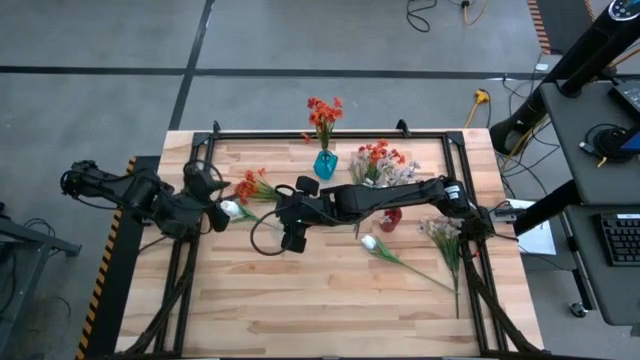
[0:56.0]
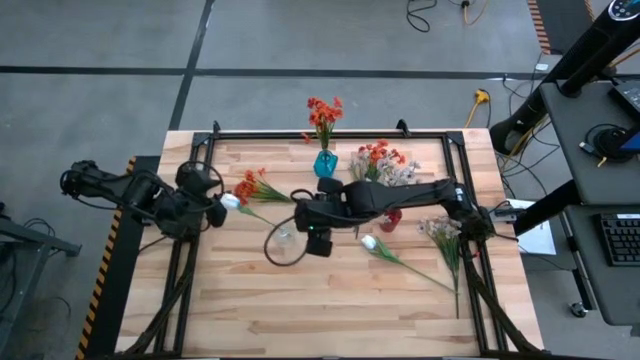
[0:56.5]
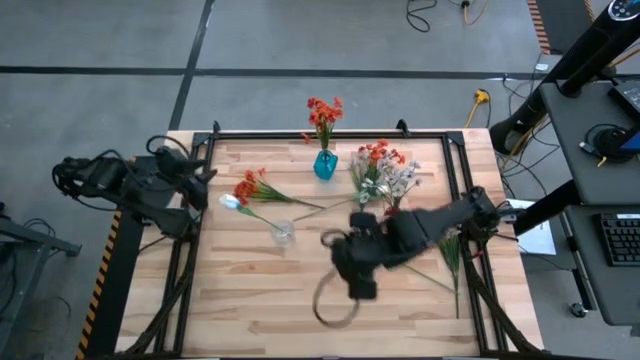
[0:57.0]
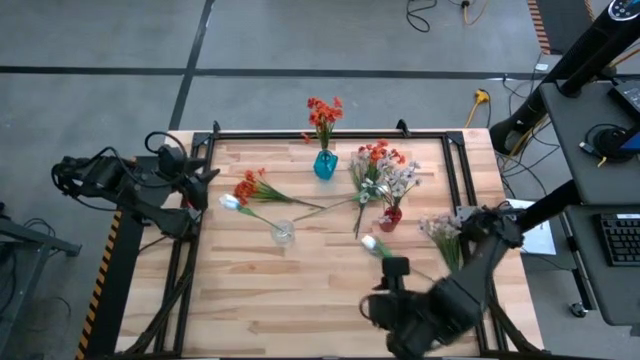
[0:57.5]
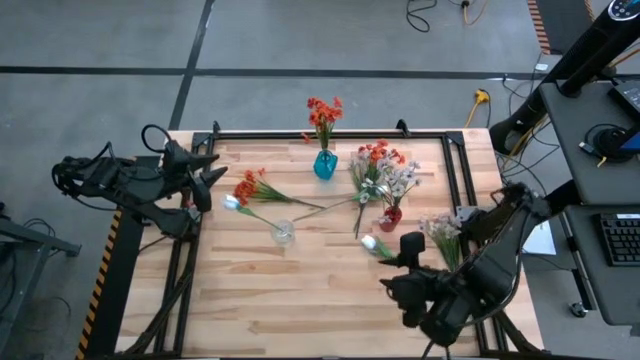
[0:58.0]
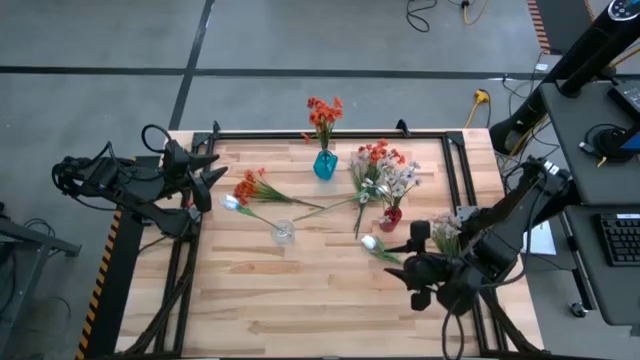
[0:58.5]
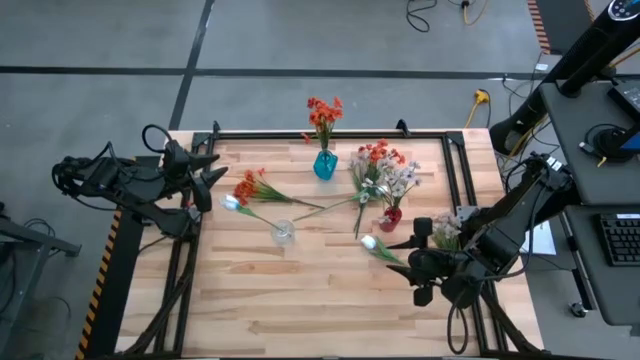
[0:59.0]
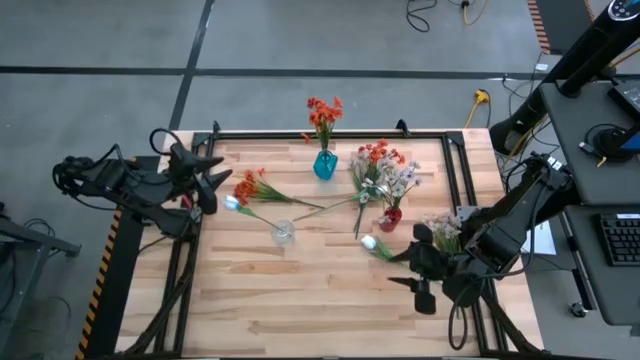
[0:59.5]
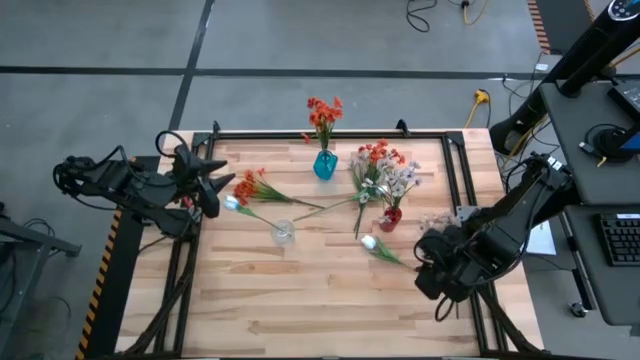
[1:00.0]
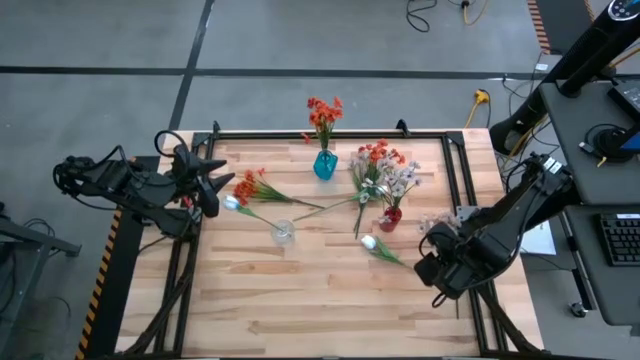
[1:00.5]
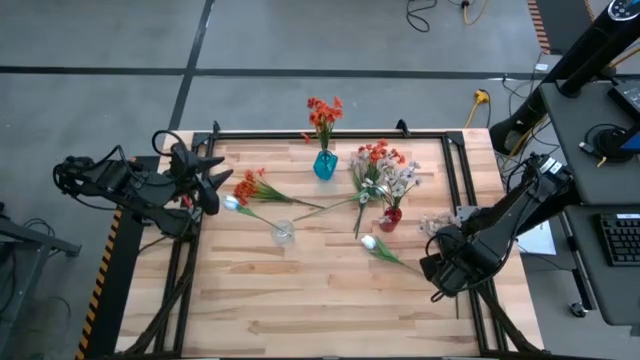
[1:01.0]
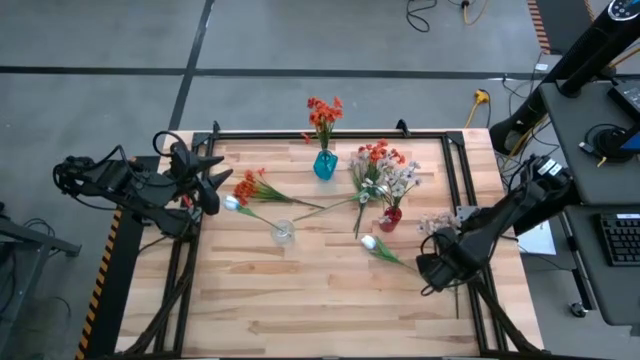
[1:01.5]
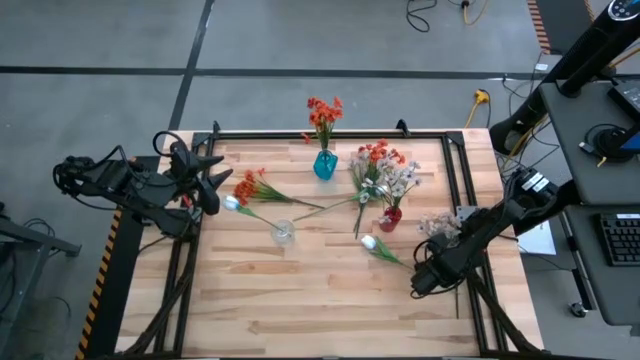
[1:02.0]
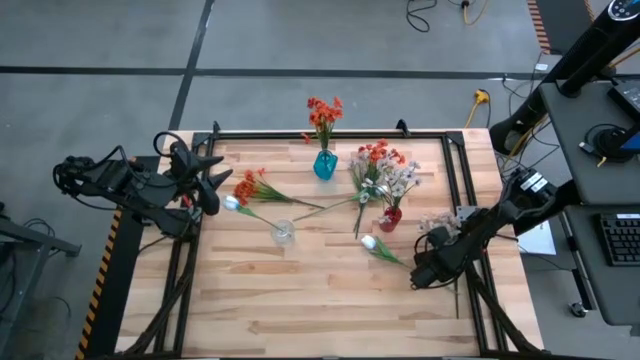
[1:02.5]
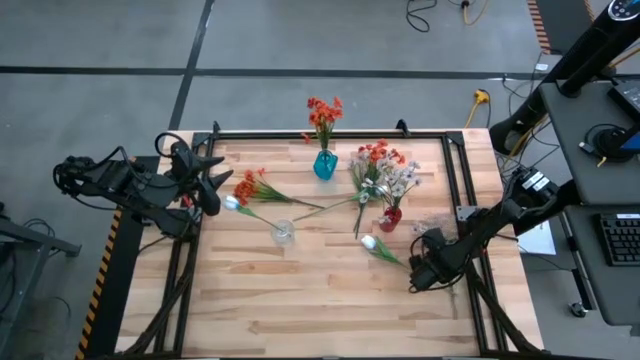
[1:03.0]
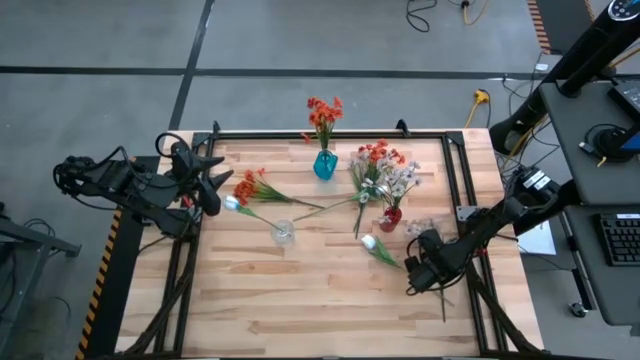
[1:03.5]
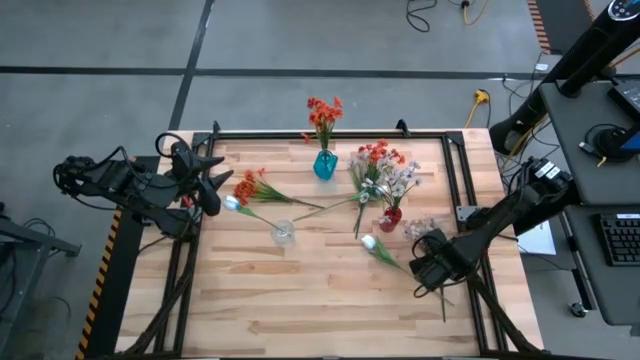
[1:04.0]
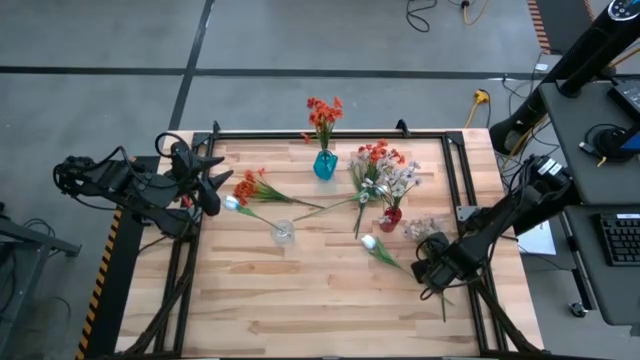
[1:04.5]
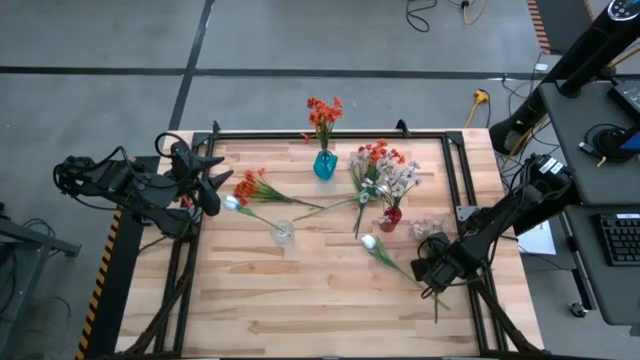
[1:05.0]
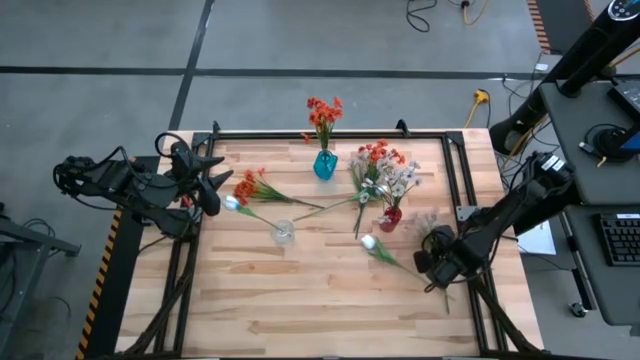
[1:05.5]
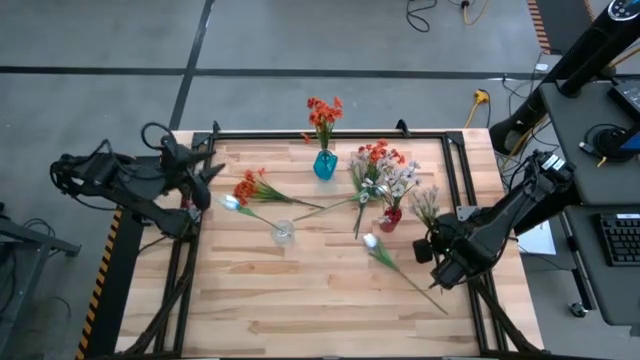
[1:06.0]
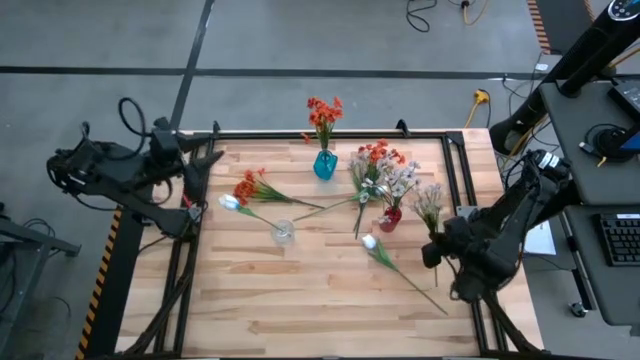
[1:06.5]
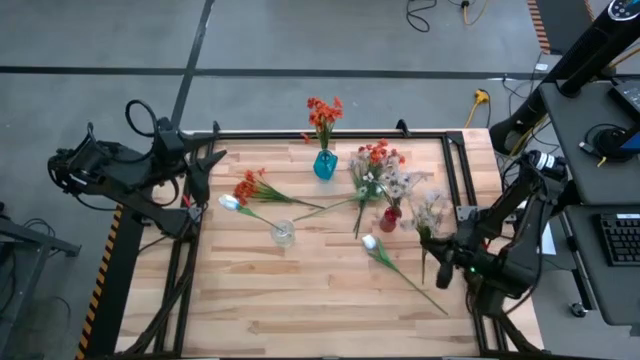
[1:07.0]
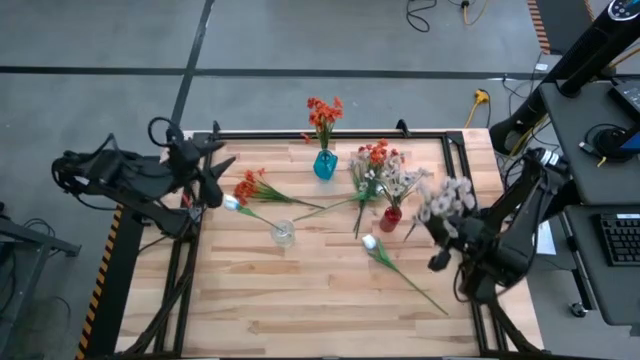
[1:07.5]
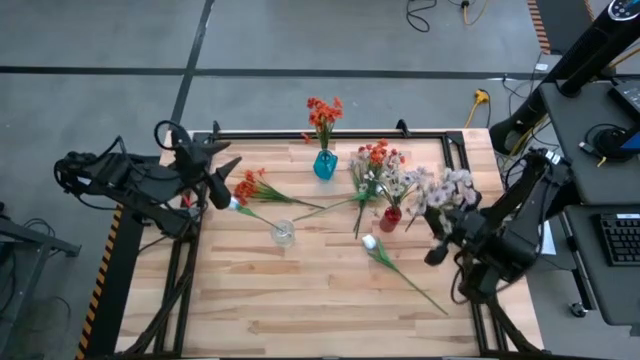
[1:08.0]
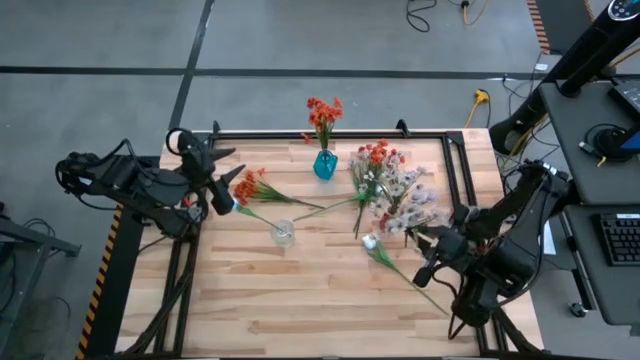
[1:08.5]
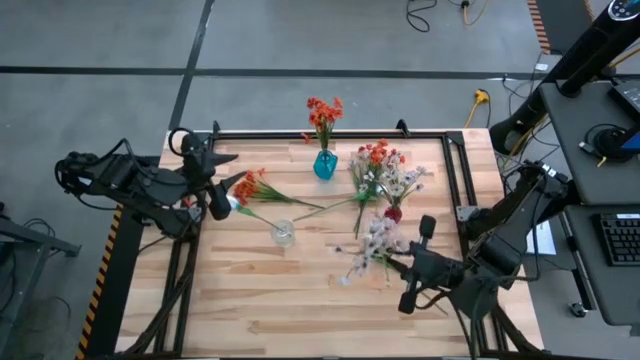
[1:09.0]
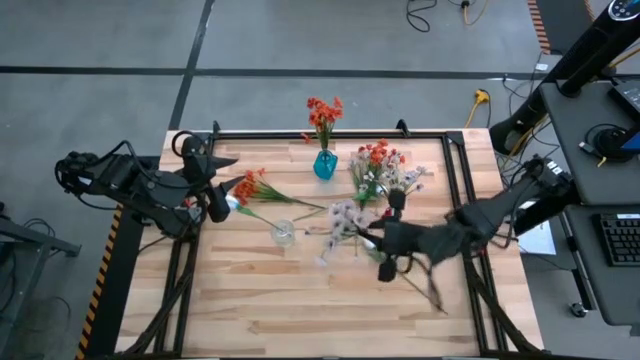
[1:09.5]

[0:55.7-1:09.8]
Task: Sort flowers into vase by color
Put the bottom white flowers into the red vase

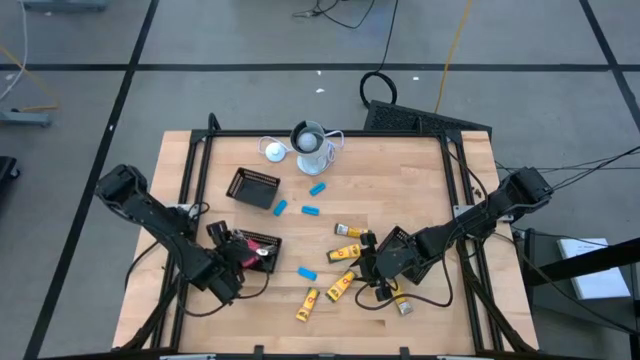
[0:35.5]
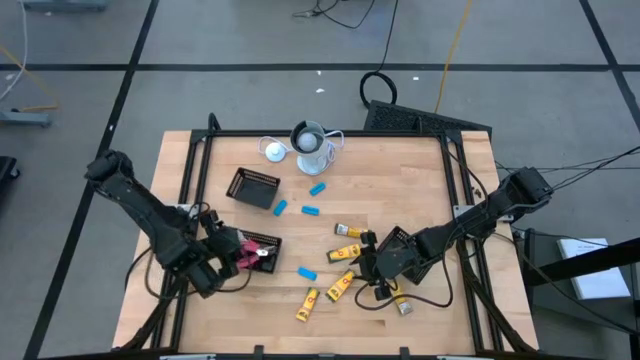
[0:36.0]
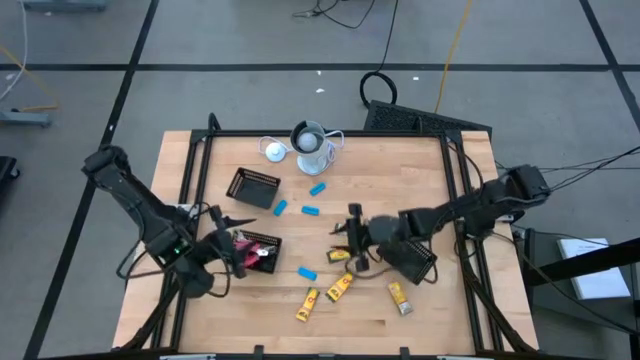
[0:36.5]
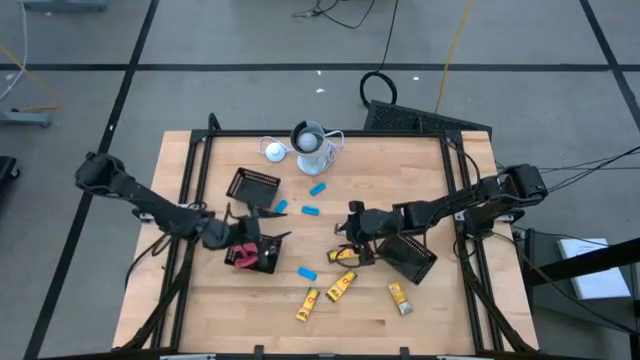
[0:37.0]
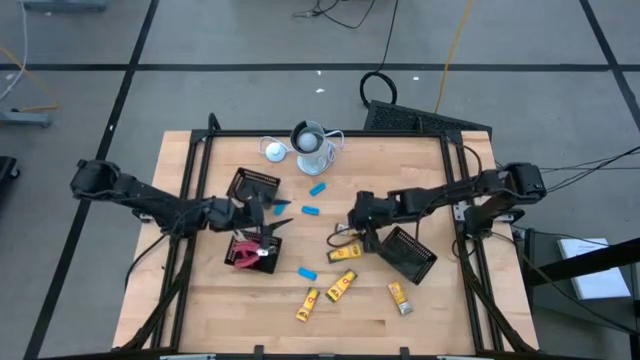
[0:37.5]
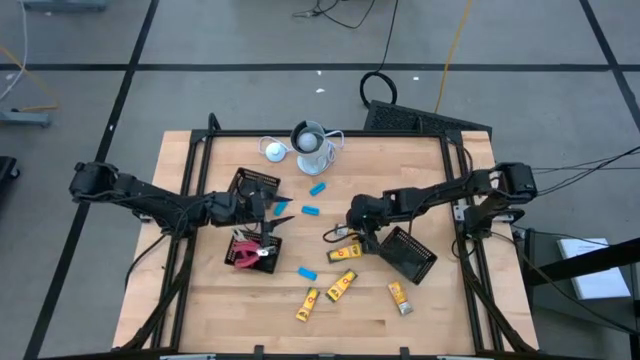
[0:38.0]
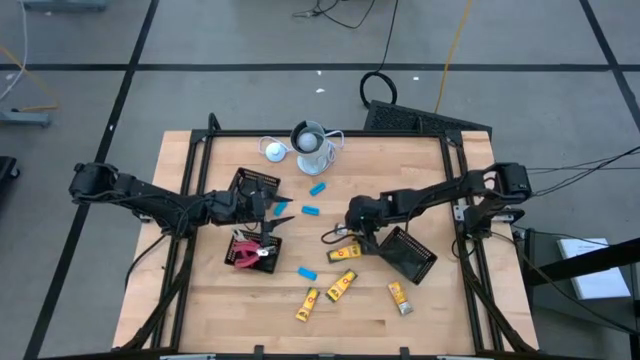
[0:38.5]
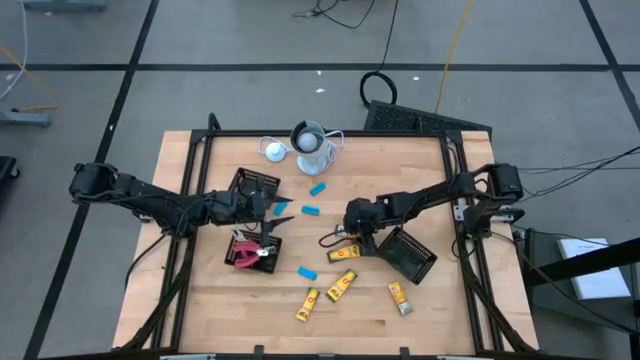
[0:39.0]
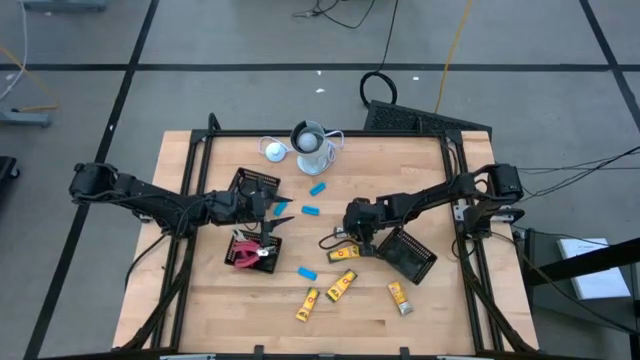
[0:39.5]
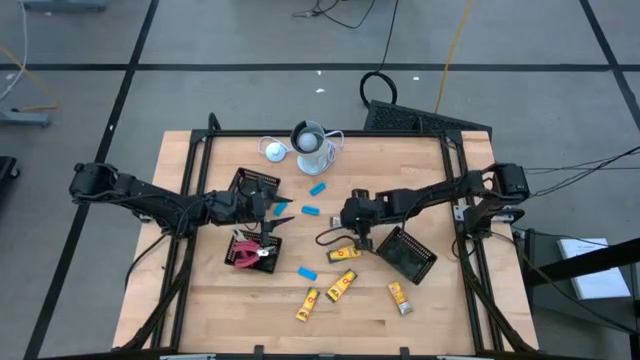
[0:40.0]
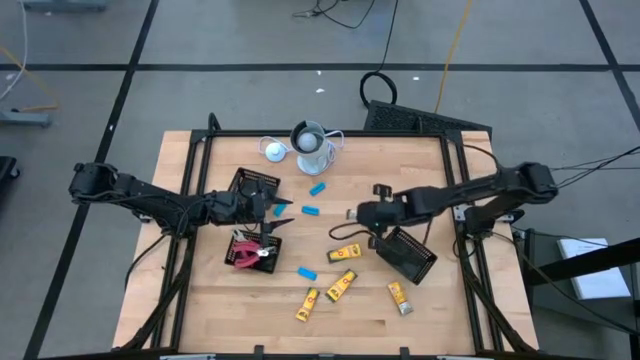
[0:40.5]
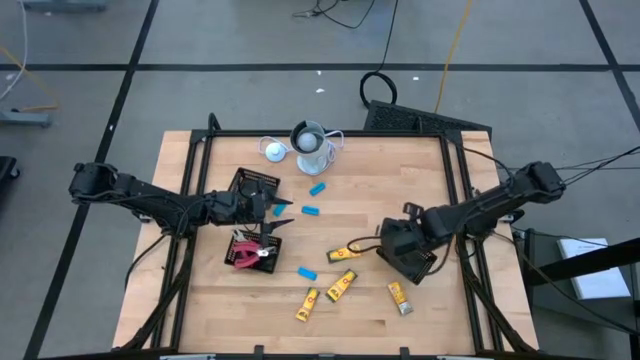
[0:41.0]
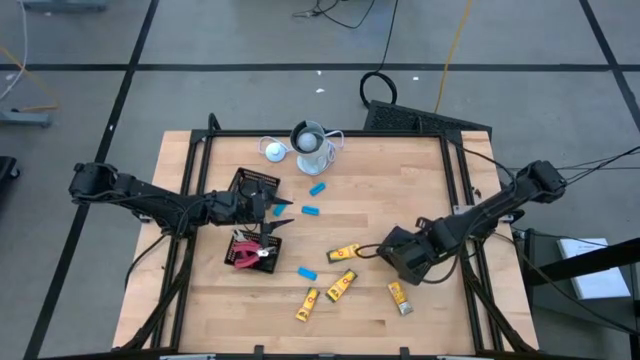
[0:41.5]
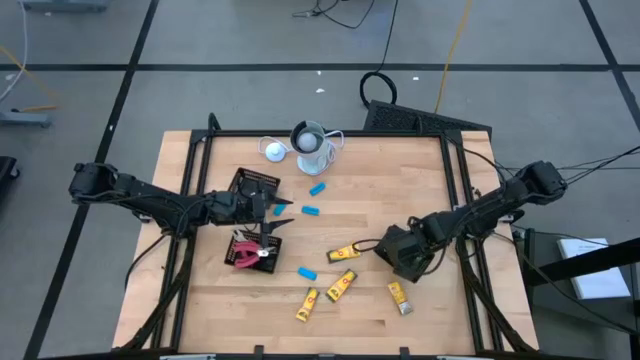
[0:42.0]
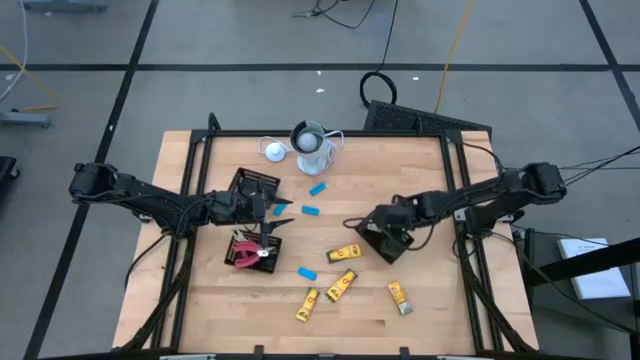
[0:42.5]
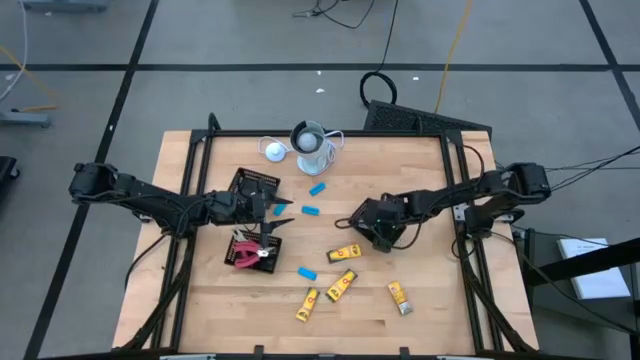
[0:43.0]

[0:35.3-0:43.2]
Task: Pick & Place School Supplies
Put the yellow crayon box into the bottom right black bin
